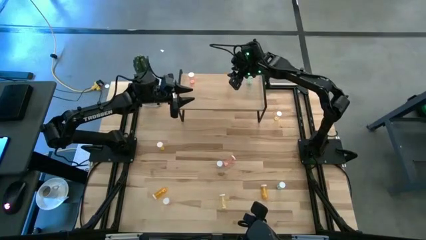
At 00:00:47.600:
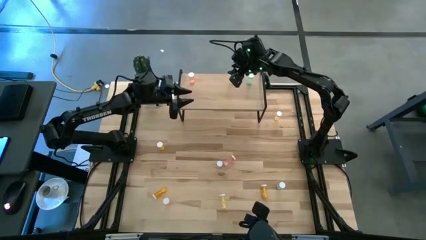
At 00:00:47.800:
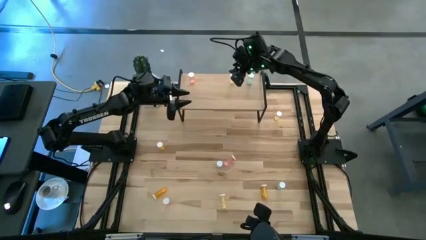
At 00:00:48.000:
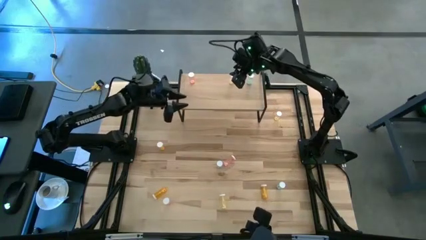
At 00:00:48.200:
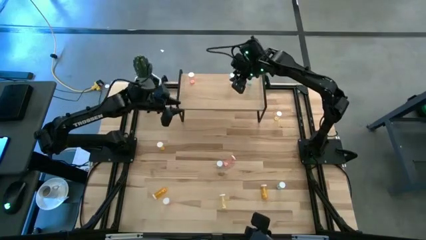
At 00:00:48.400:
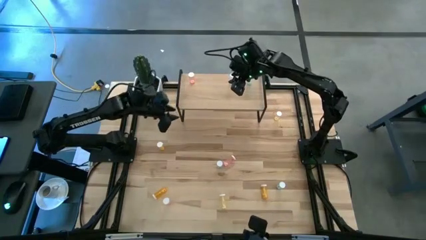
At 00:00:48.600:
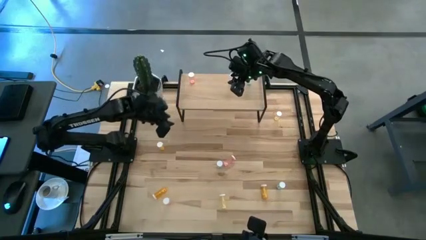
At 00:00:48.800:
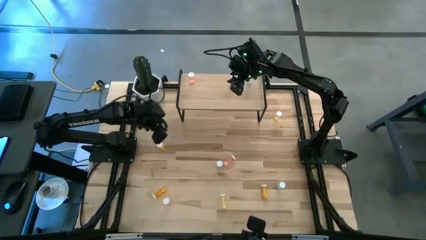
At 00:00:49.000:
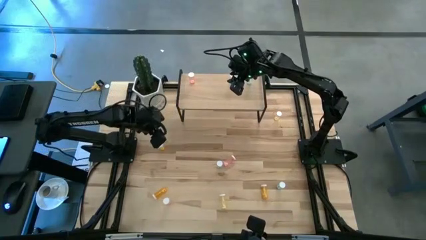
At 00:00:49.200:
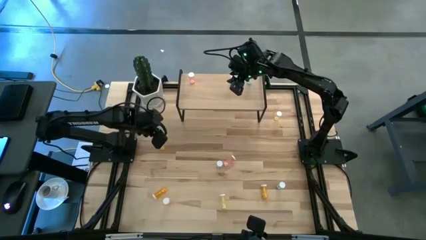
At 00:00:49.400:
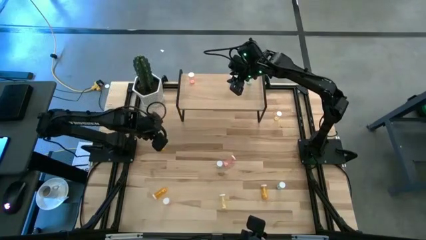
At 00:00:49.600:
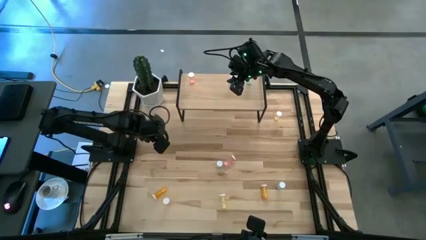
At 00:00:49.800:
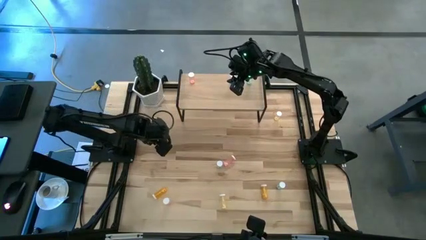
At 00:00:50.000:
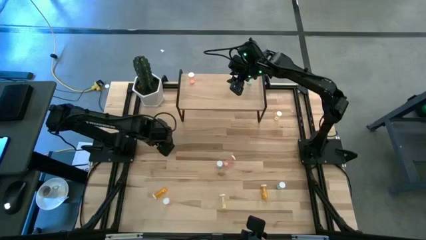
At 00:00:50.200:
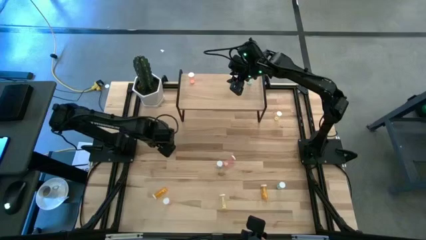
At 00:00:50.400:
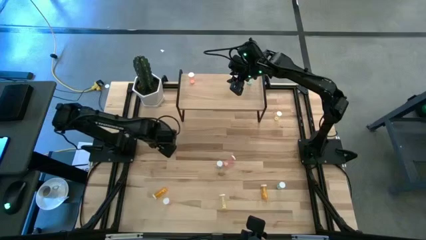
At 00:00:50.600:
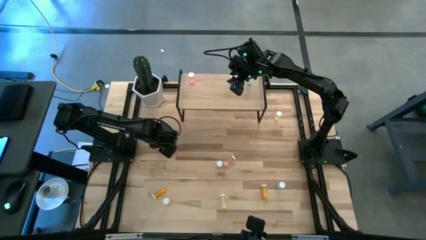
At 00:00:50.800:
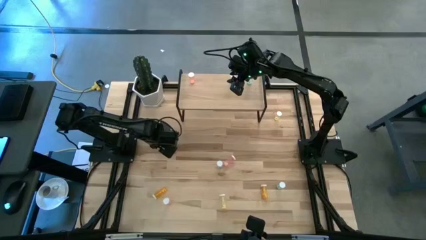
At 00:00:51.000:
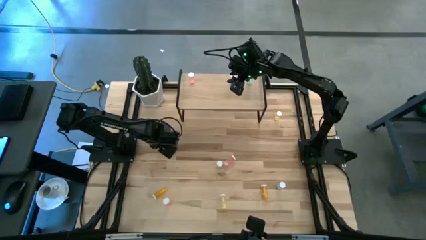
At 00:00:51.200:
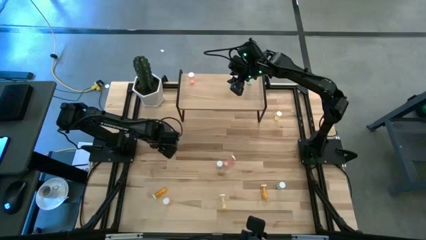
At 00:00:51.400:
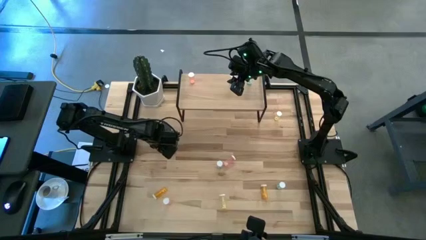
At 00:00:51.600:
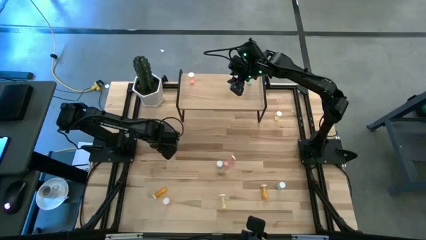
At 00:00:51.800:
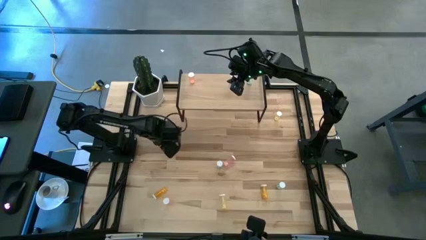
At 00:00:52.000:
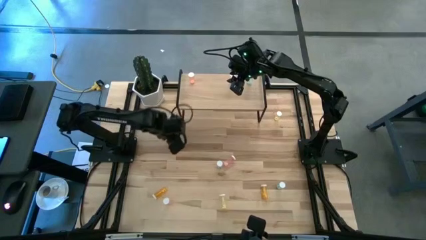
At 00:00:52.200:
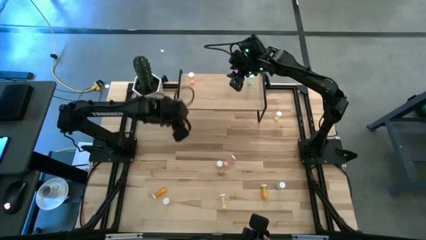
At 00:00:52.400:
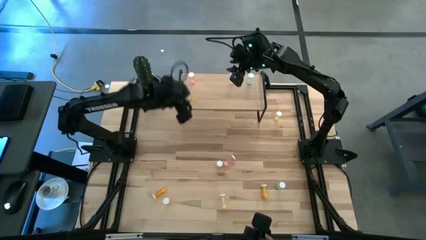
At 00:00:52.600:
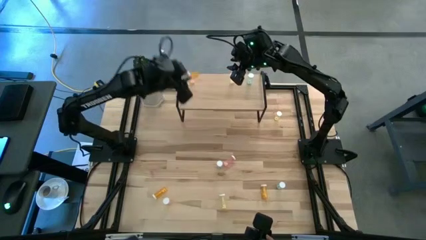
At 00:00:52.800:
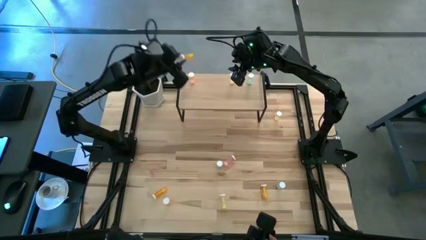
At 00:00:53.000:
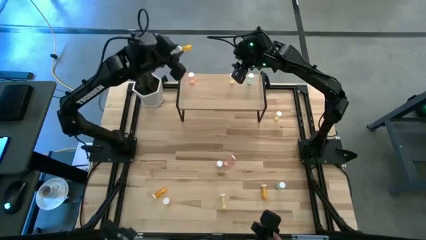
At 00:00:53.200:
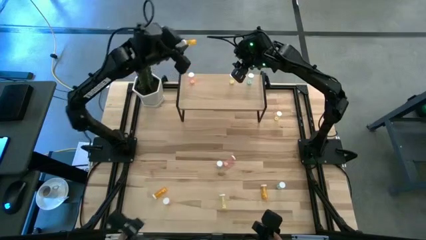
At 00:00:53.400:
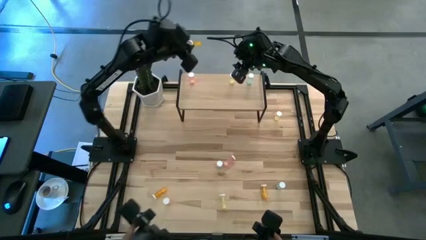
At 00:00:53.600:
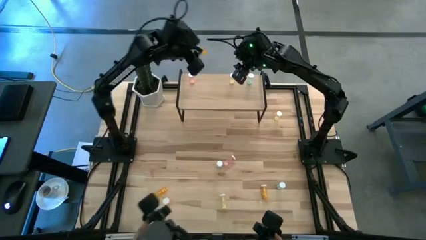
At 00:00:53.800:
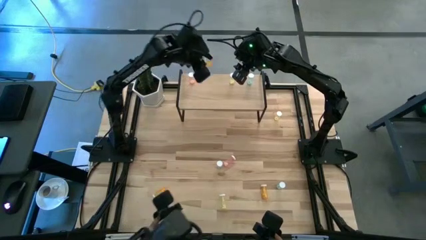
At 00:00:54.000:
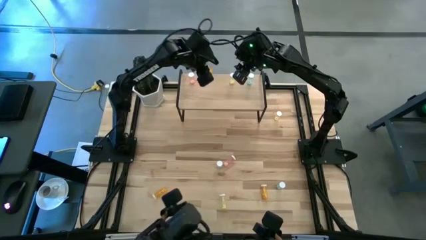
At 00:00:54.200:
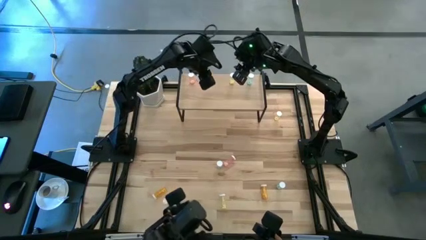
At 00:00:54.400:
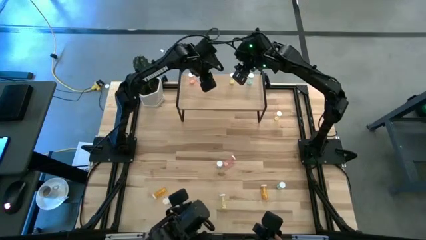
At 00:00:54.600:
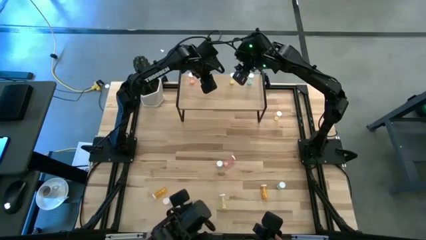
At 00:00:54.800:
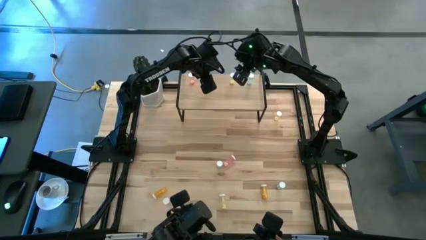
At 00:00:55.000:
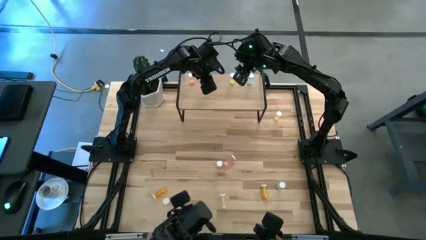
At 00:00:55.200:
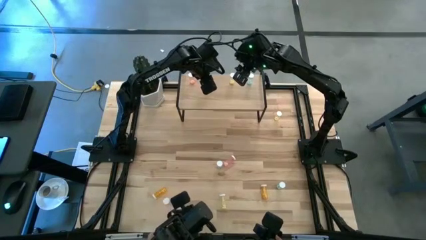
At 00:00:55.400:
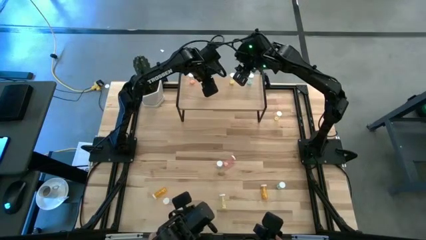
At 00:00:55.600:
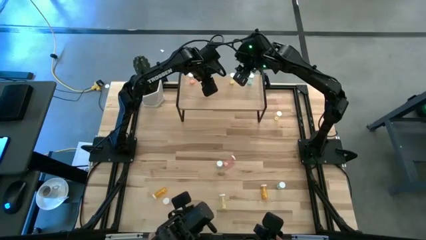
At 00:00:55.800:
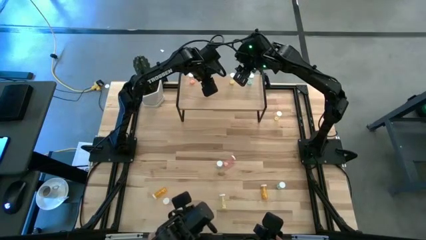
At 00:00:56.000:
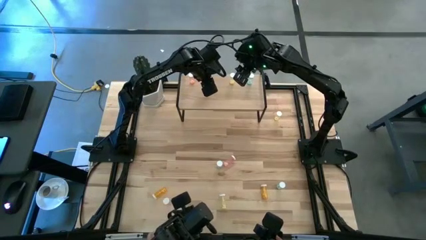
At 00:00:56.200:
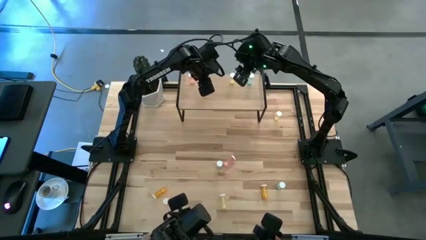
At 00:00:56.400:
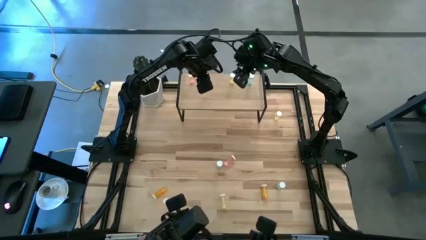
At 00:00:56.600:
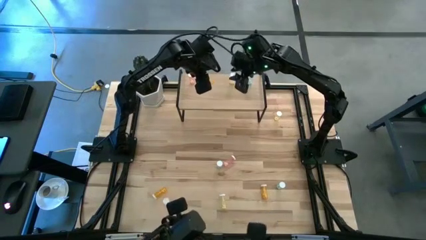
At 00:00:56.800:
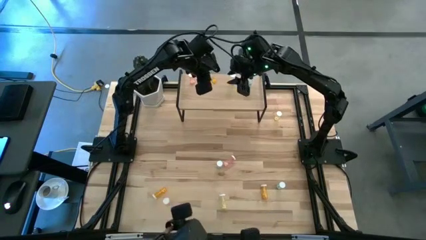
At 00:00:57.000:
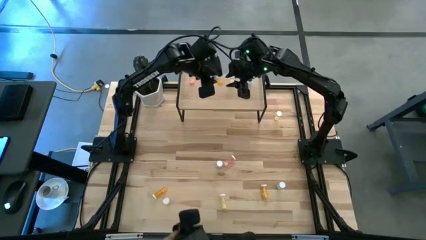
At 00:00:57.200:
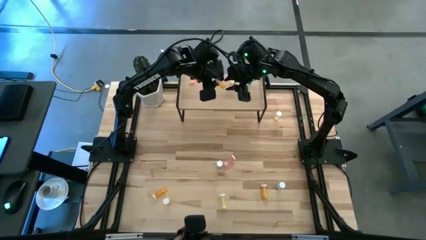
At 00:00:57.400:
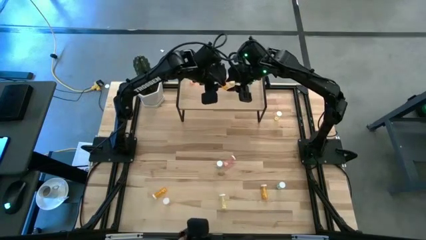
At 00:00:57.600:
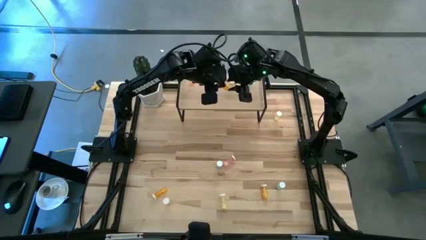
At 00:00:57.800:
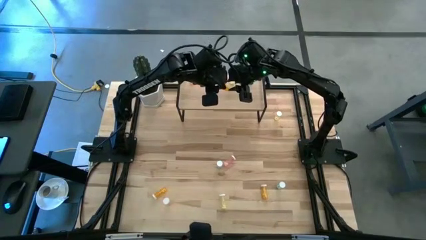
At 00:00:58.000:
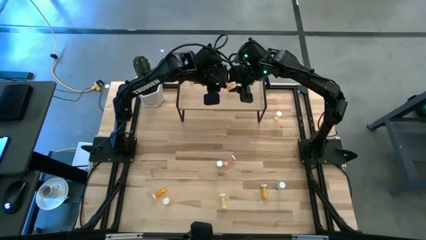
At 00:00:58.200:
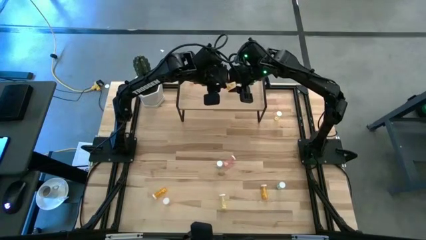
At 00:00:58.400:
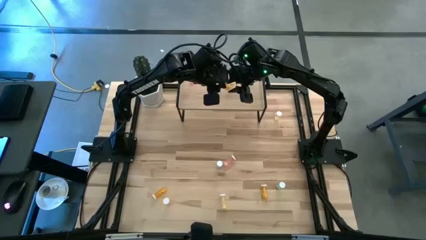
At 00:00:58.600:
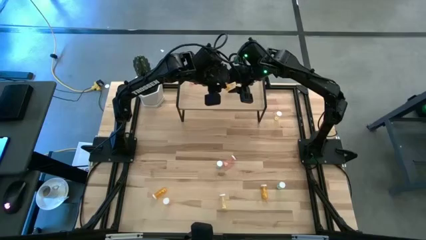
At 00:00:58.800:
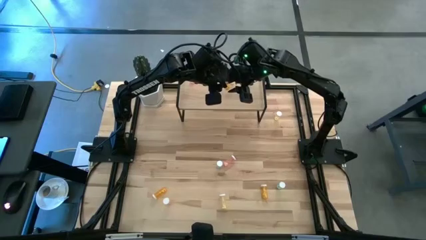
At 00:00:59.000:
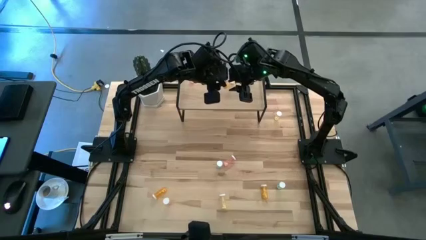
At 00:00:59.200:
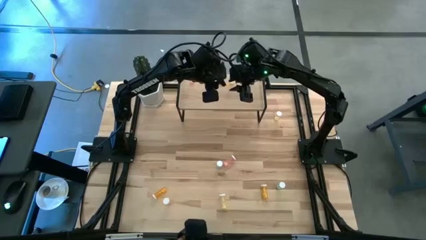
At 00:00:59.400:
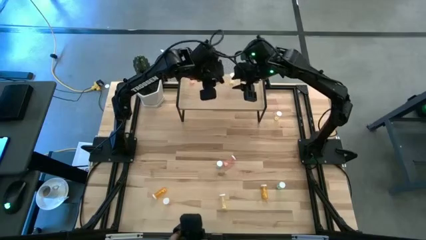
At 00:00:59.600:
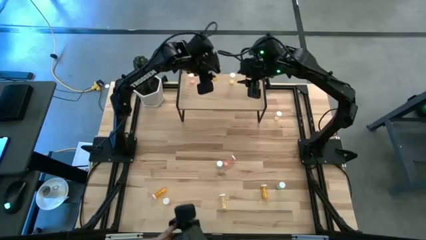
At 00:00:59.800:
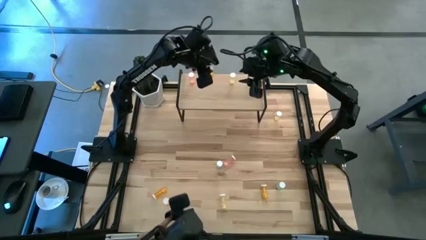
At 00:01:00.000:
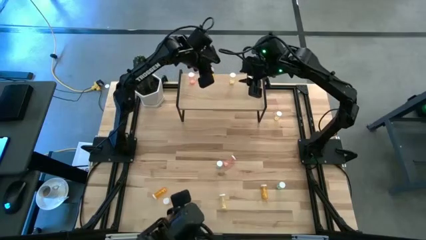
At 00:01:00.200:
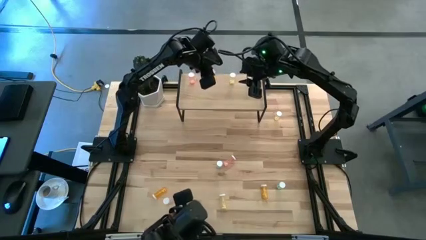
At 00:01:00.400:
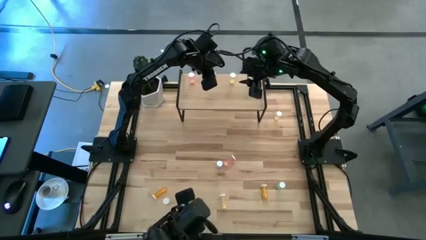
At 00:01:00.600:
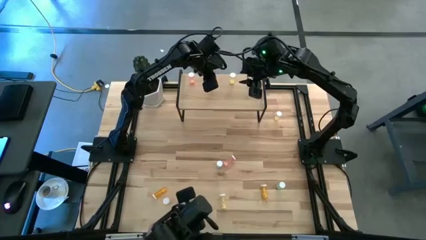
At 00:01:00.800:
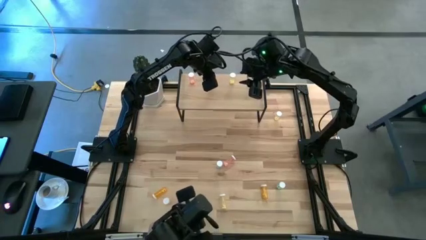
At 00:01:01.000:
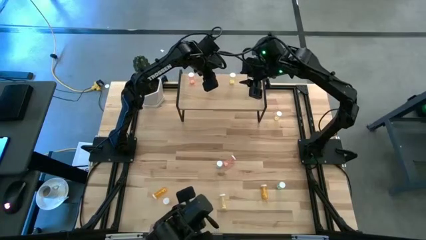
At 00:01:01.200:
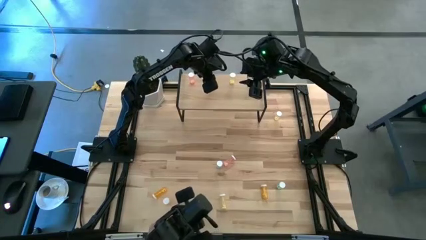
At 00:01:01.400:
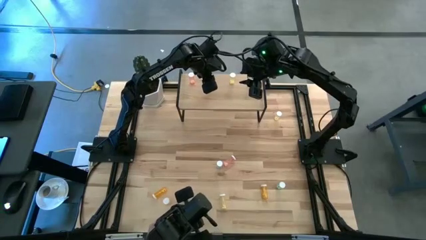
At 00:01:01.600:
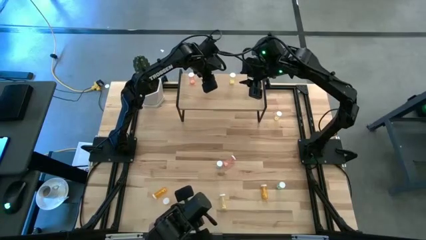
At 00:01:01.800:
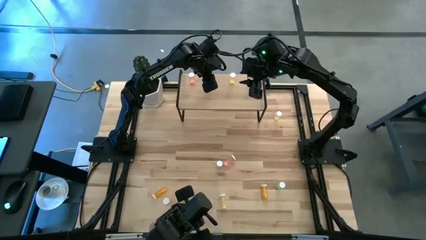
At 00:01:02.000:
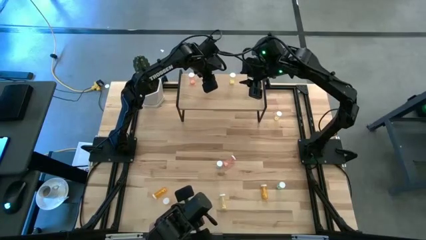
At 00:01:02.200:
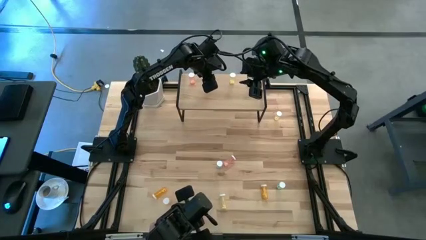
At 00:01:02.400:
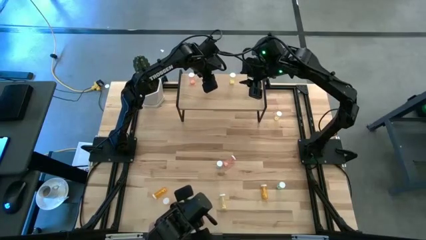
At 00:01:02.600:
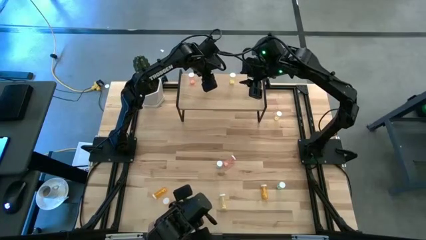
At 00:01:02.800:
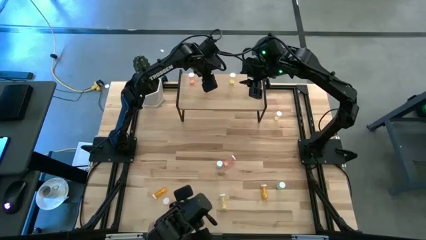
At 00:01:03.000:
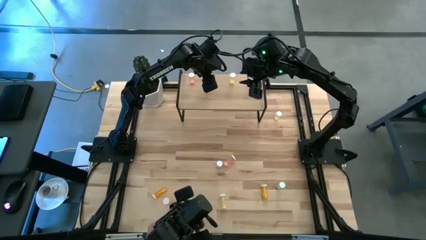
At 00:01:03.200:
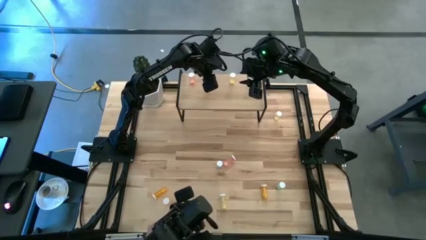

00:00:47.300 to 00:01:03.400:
Task: Pick and place medicine bottles onto shelf by color
Put the top orange pill bottle on the shelf
